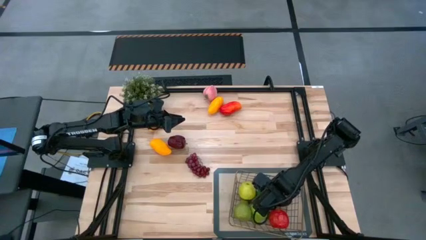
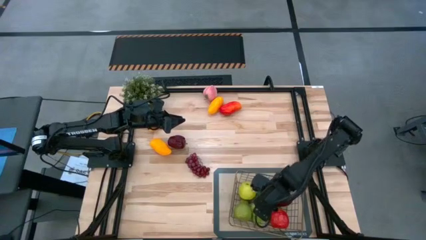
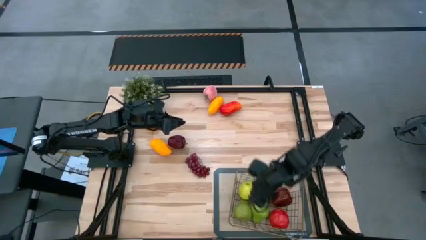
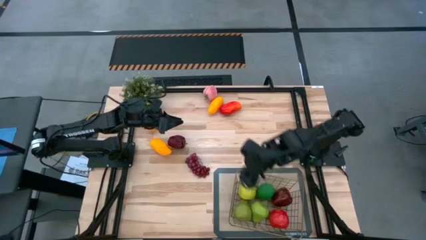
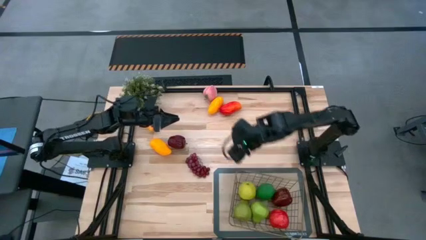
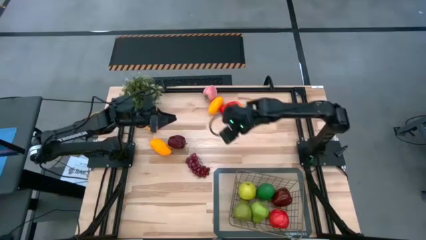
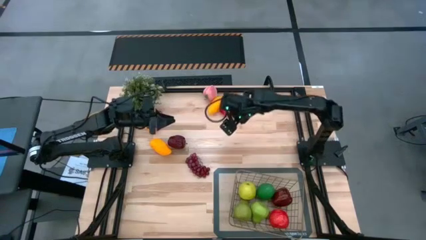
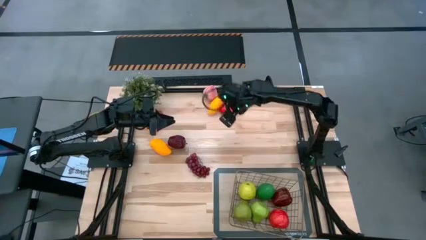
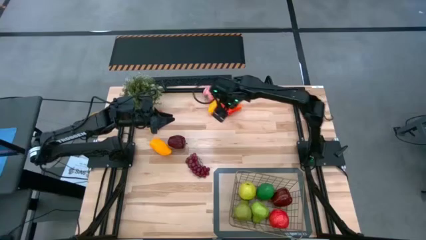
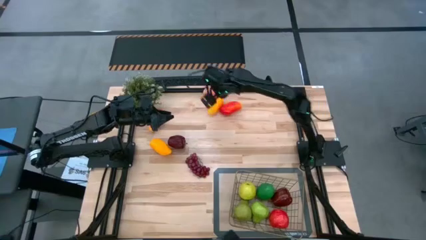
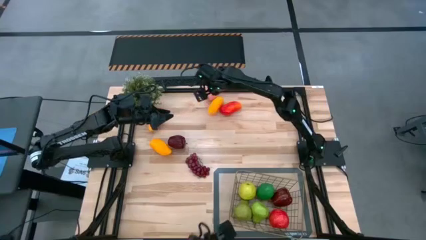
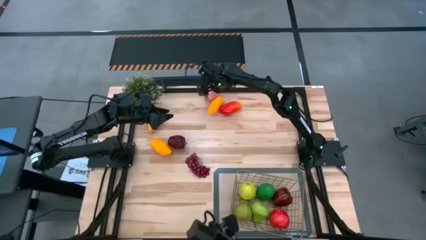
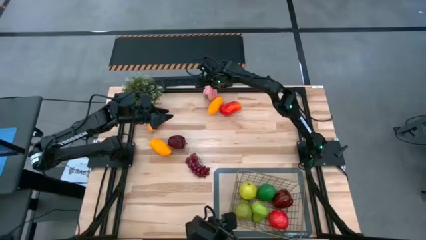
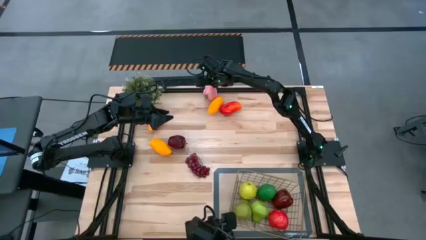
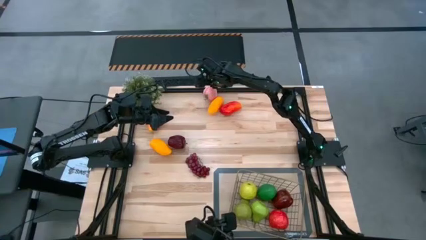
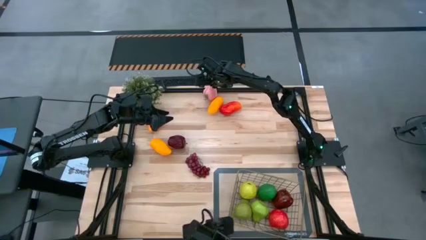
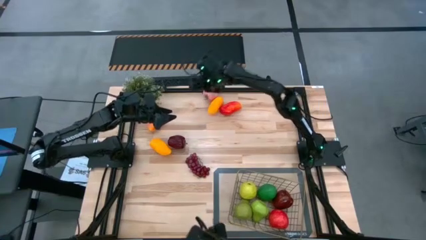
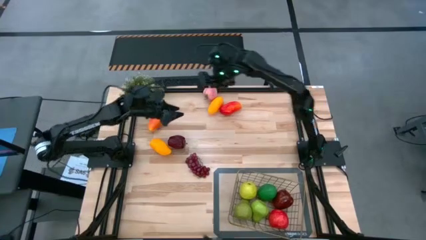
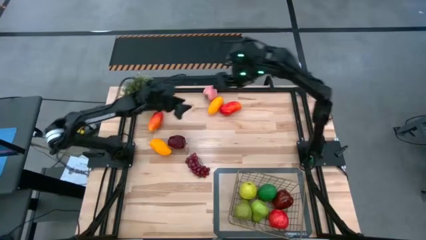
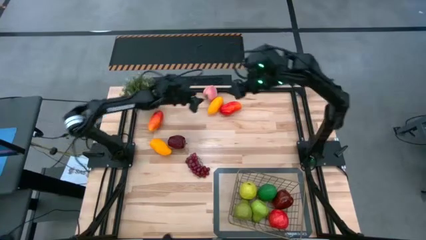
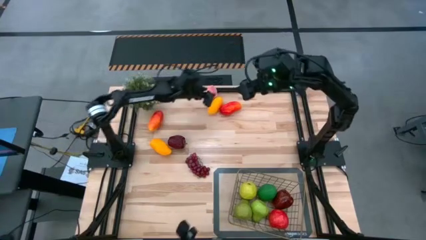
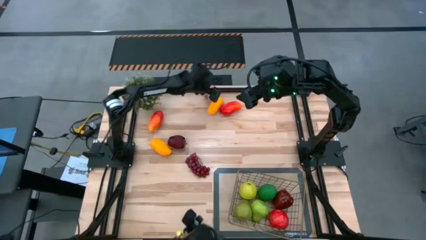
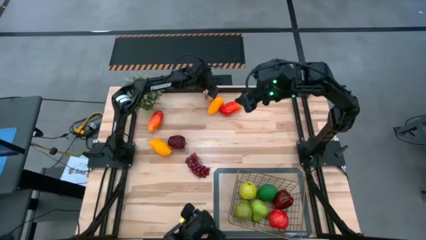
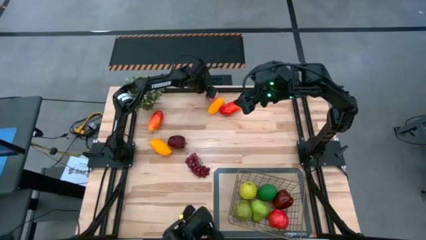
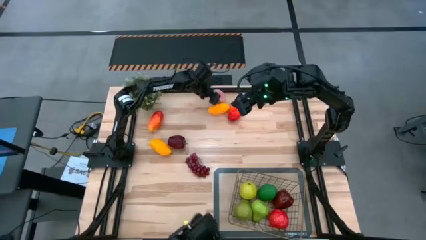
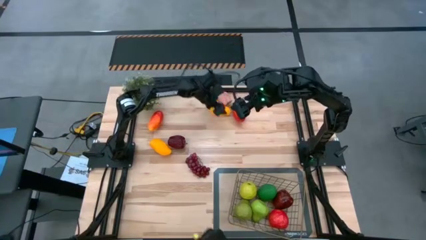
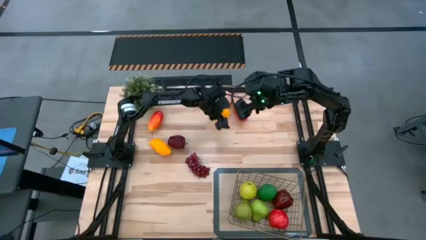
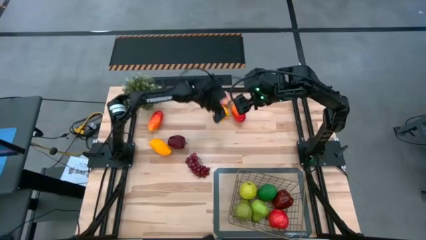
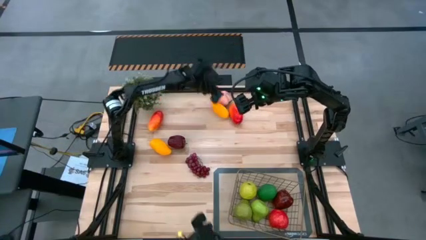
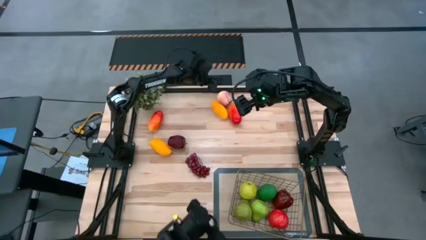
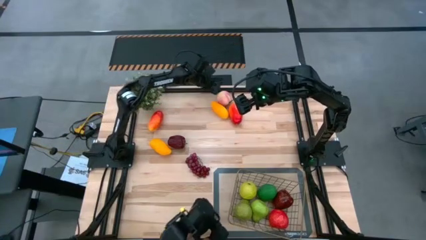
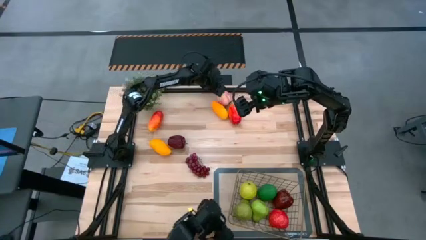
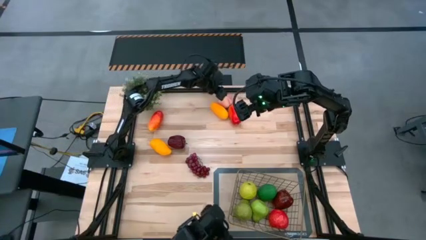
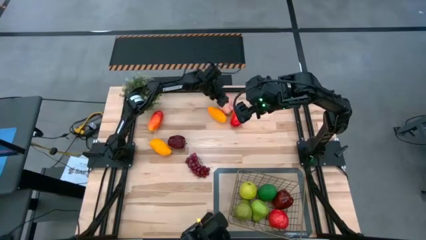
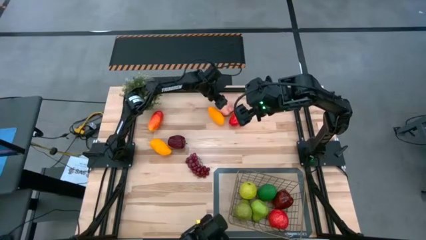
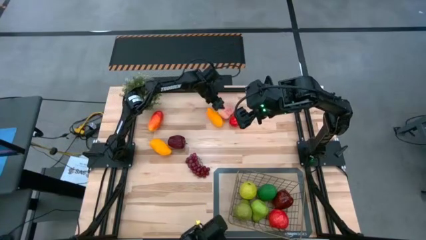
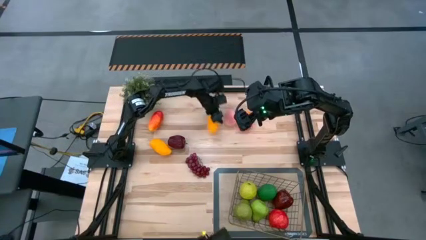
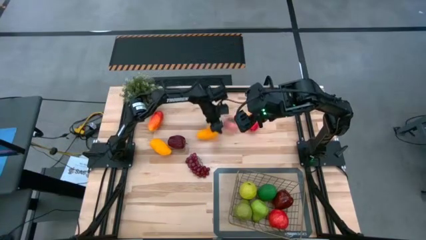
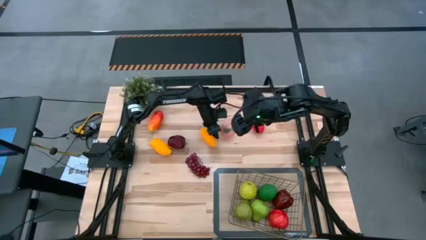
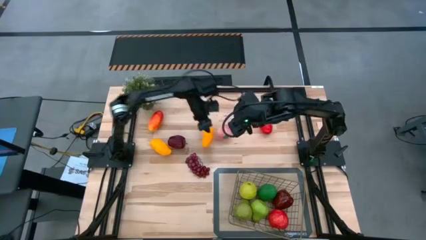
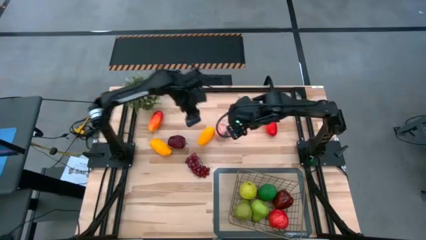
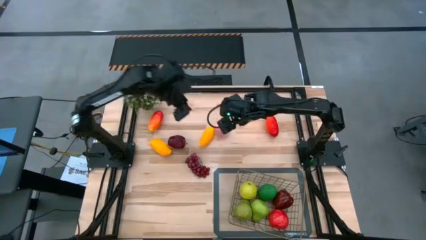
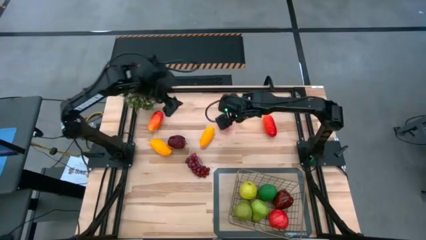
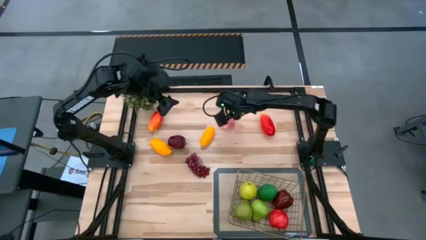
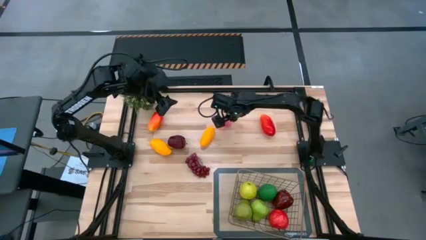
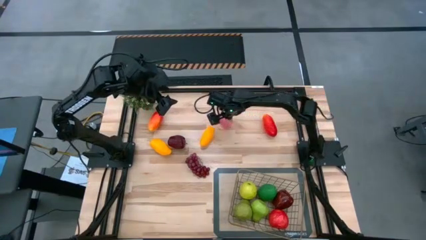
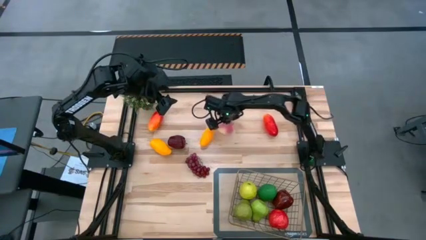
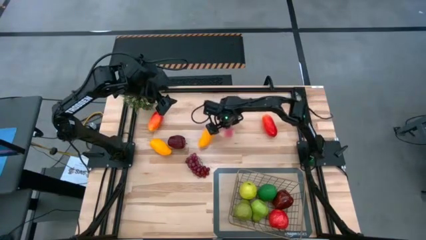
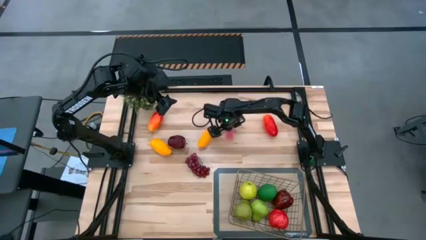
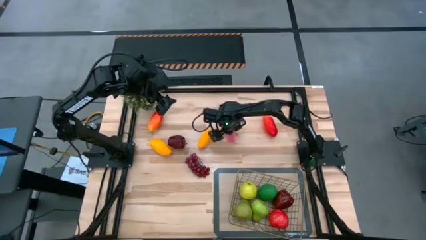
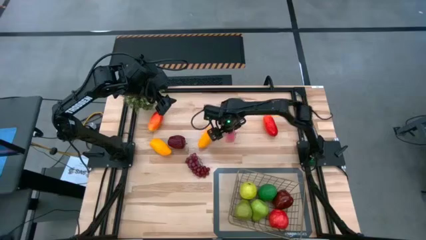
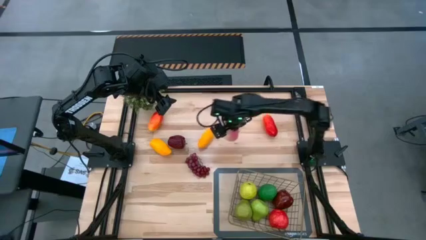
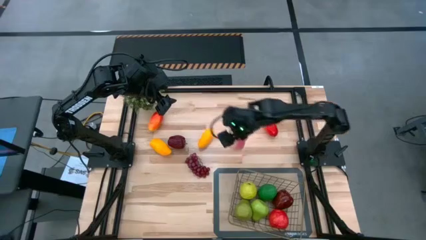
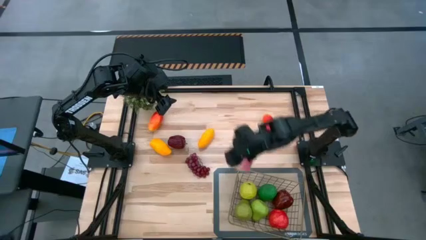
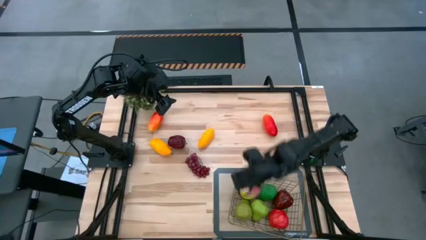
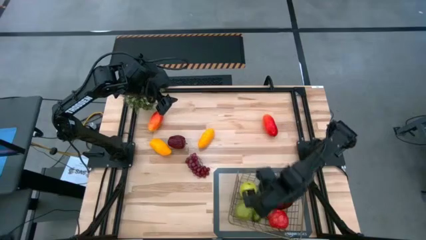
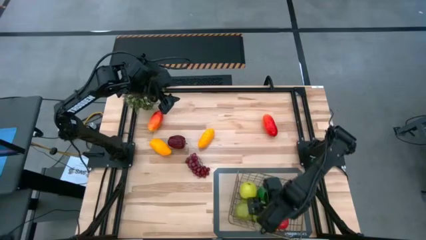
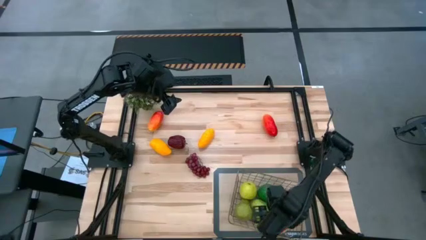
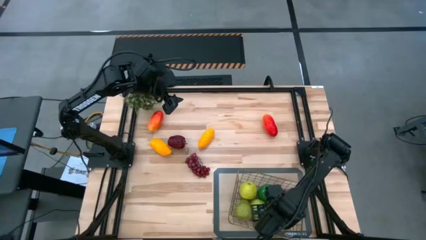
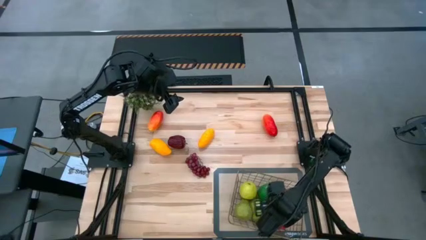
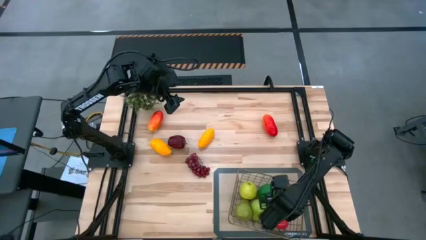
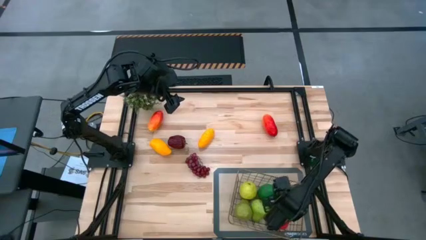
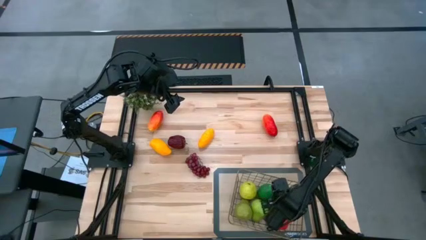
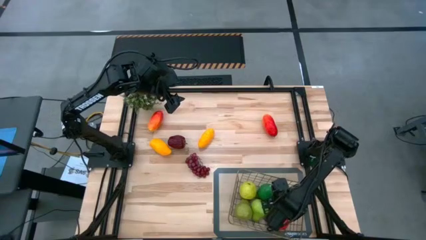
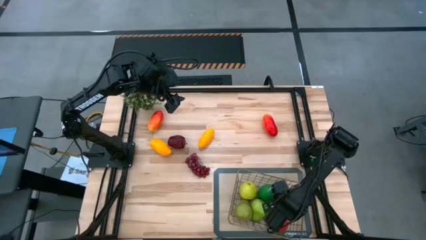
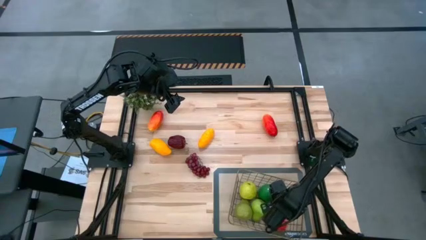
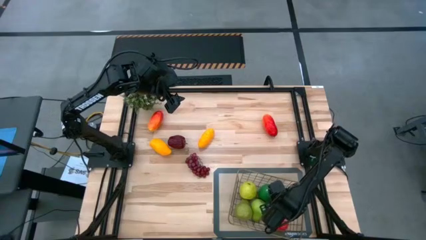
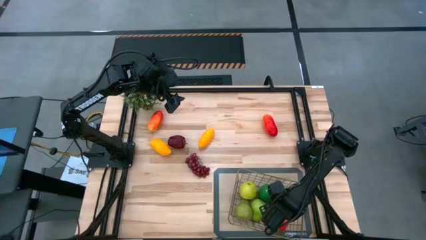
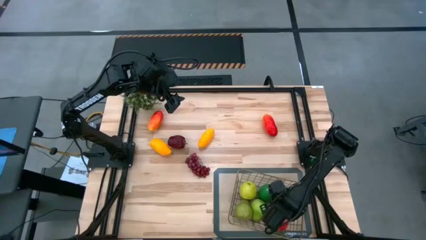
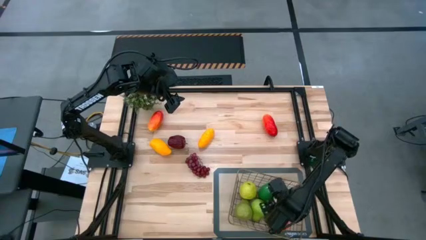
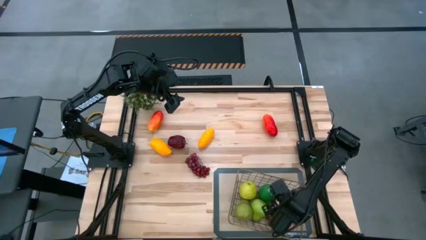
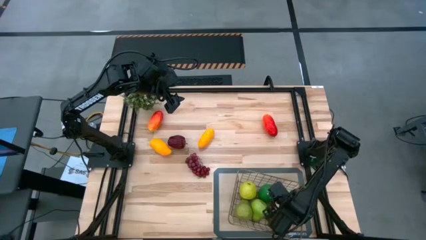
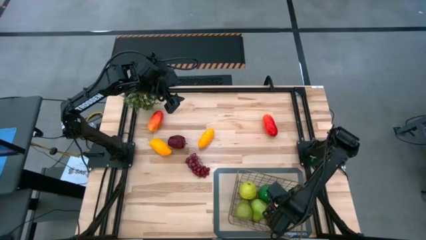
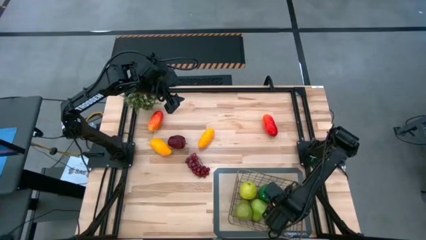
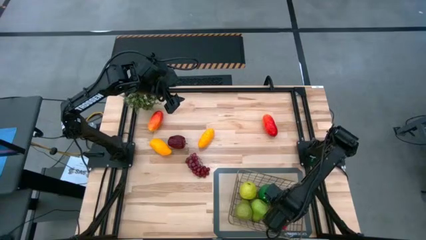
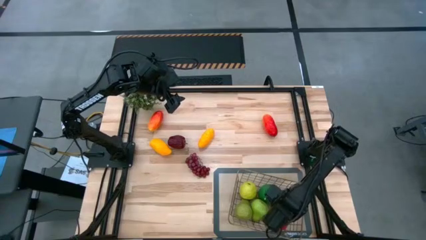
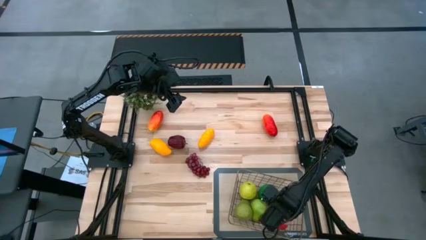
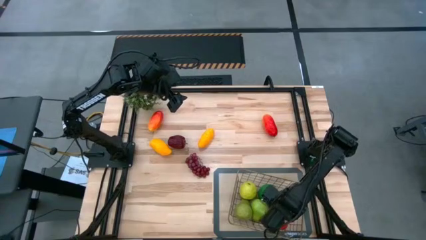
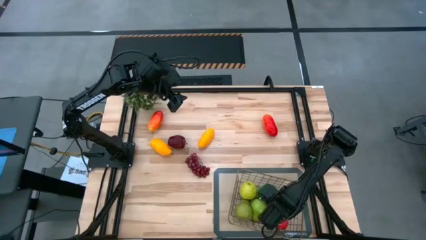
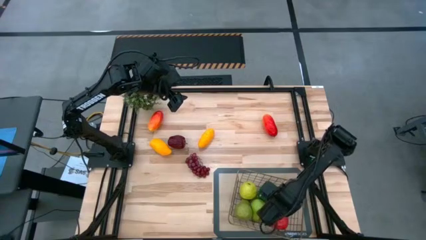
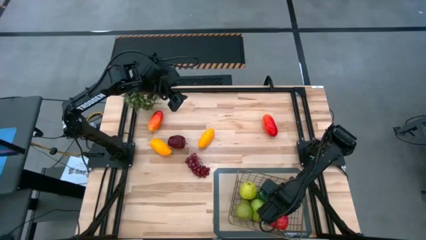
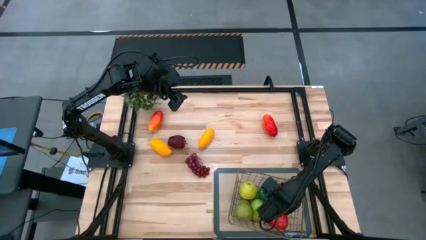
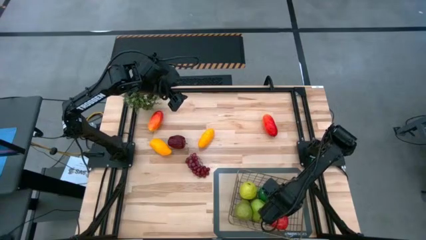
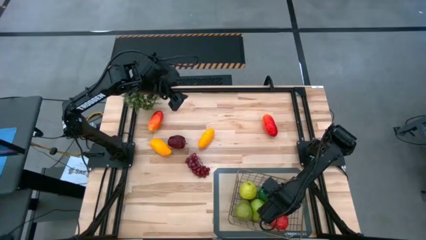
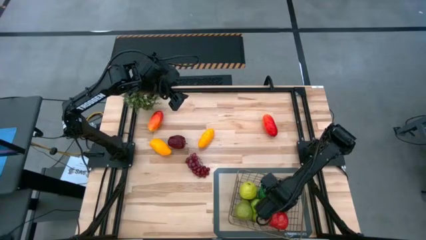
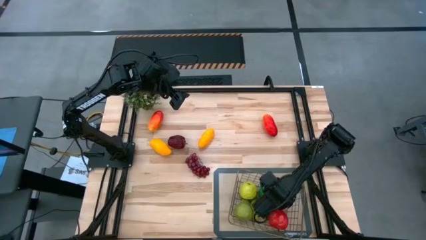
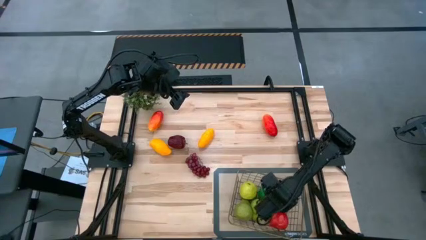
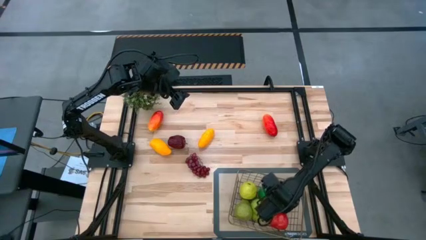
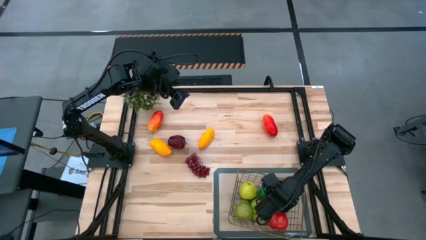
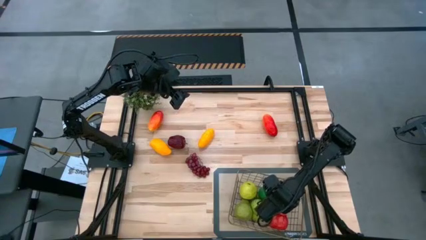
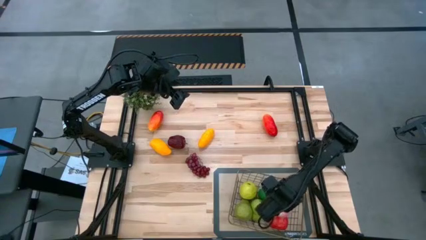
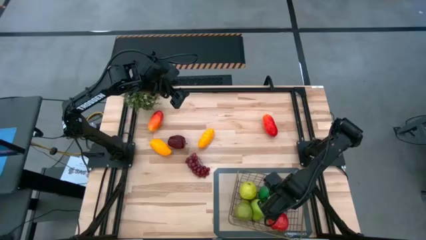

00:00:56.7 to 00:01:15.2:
Task: Build produce basket
Put the pink peach into the wire basket
